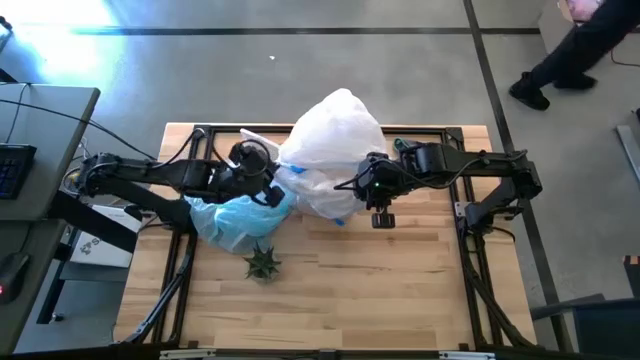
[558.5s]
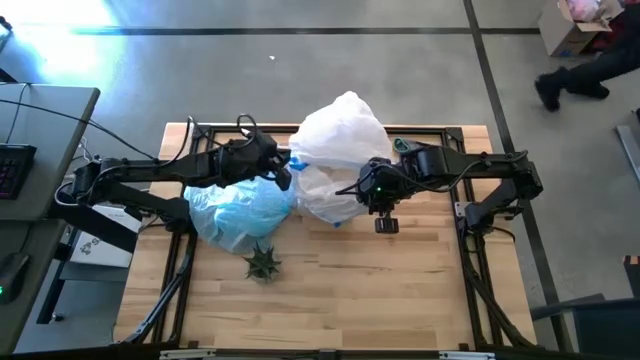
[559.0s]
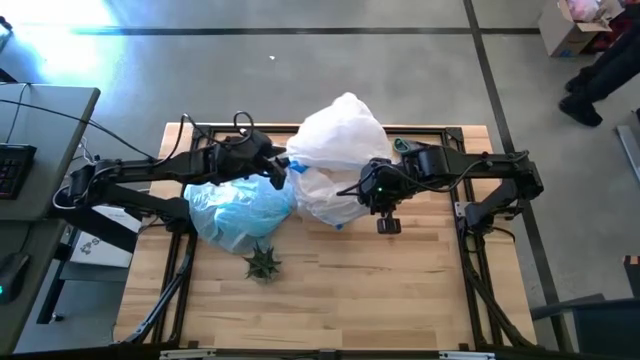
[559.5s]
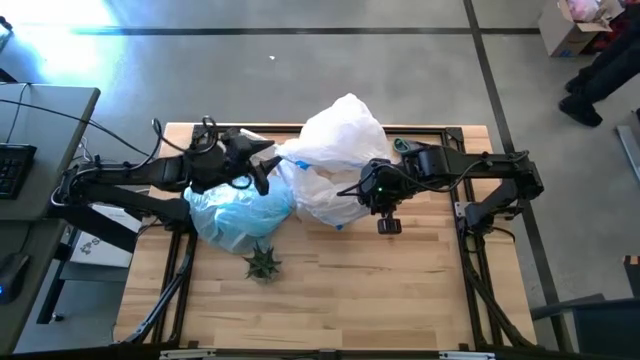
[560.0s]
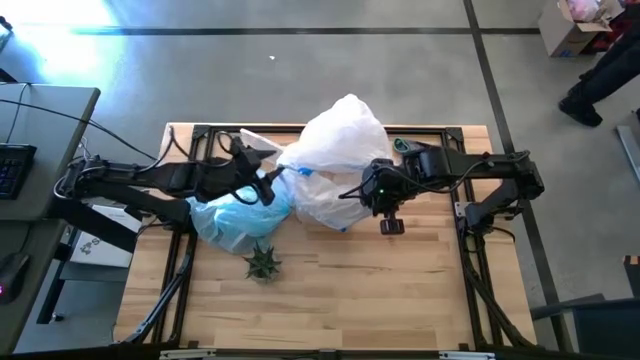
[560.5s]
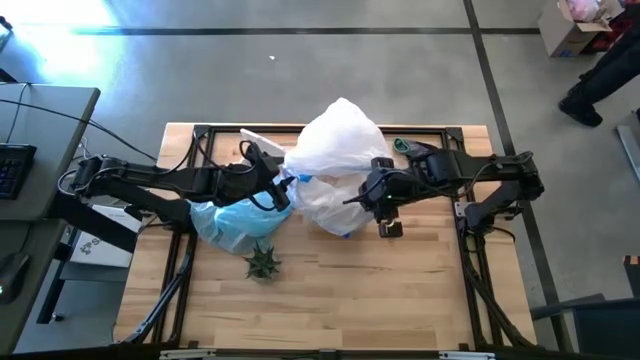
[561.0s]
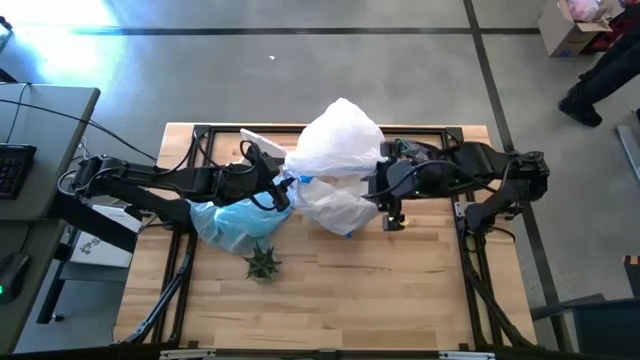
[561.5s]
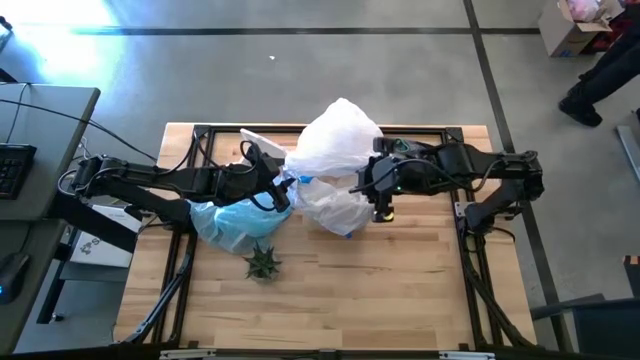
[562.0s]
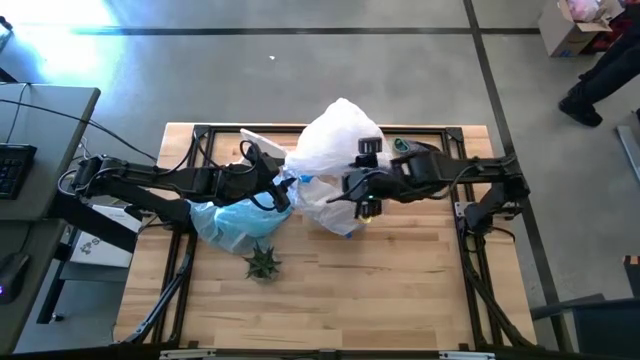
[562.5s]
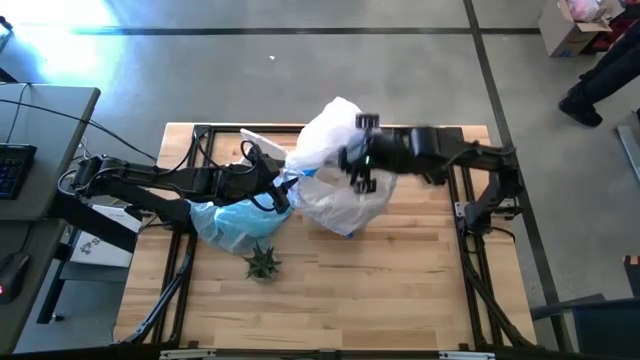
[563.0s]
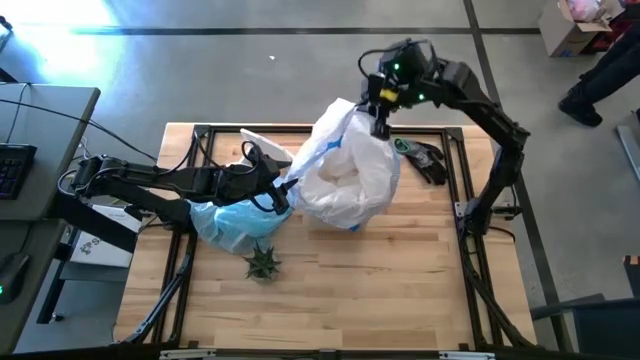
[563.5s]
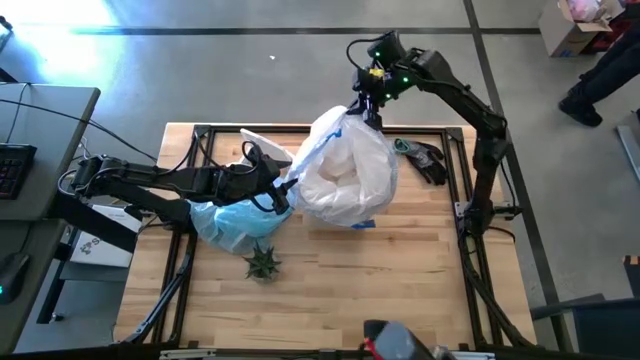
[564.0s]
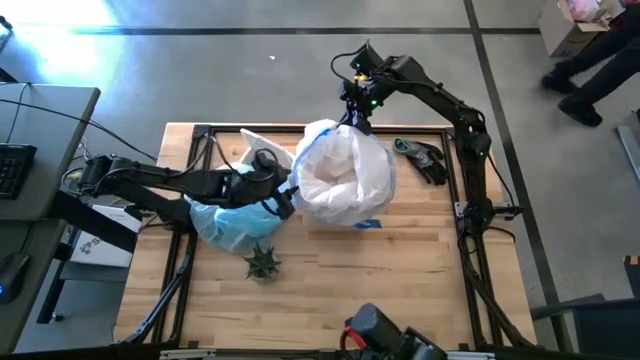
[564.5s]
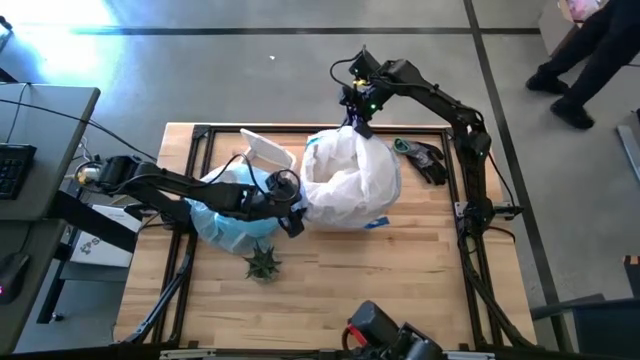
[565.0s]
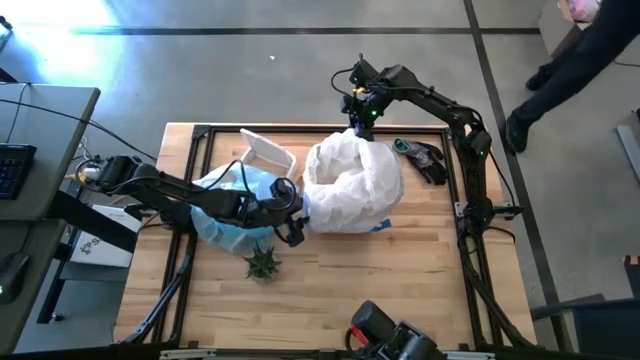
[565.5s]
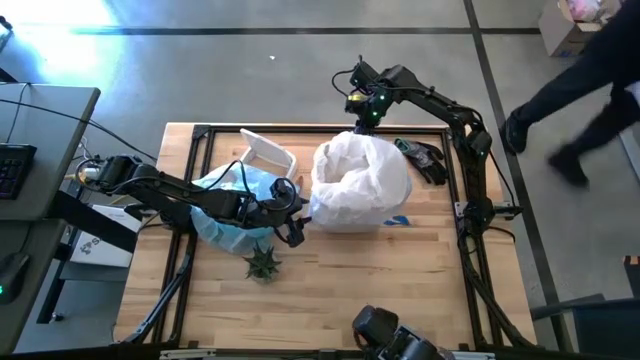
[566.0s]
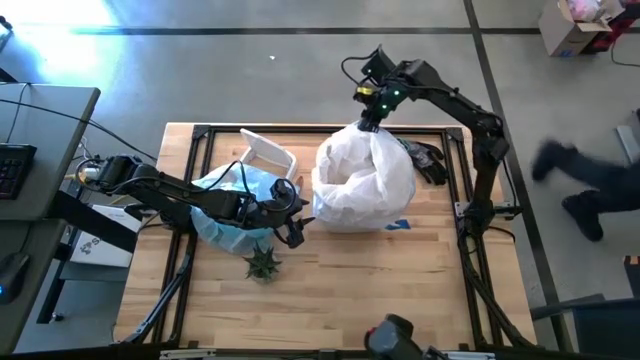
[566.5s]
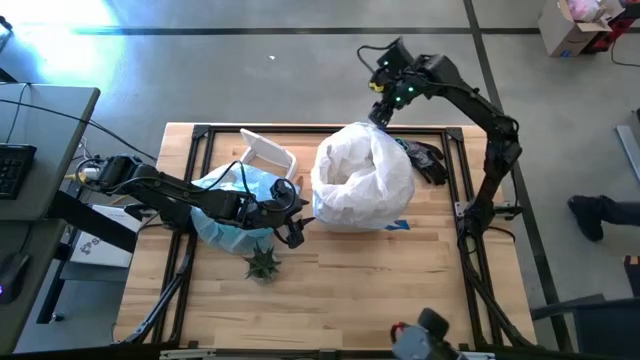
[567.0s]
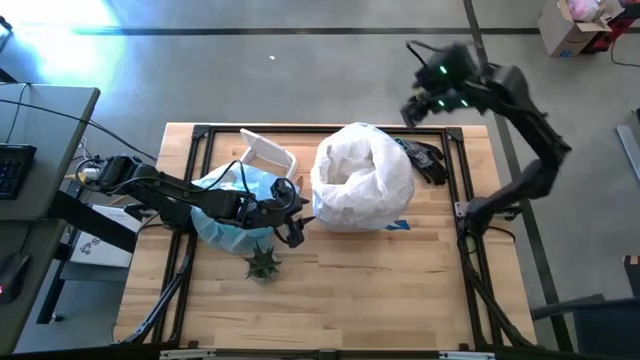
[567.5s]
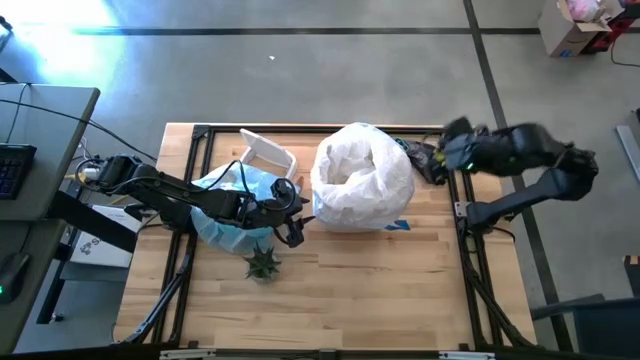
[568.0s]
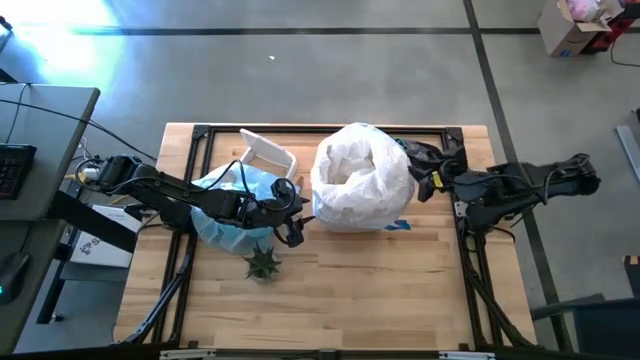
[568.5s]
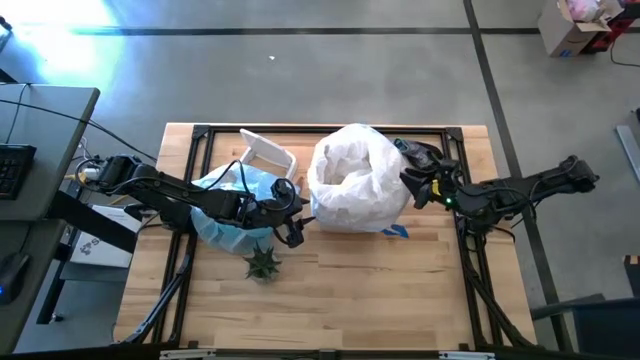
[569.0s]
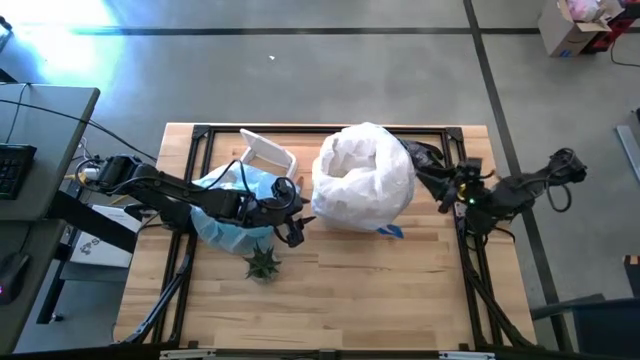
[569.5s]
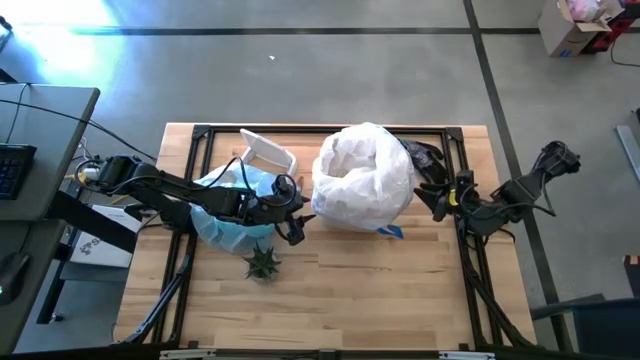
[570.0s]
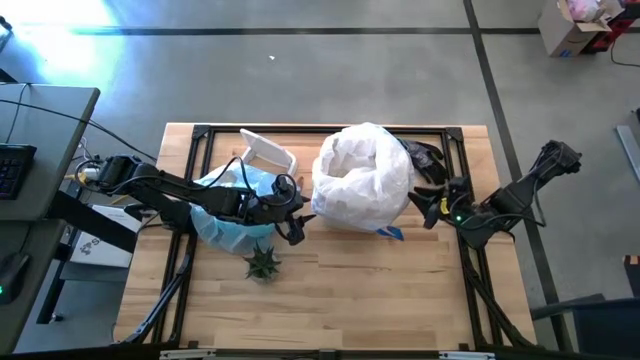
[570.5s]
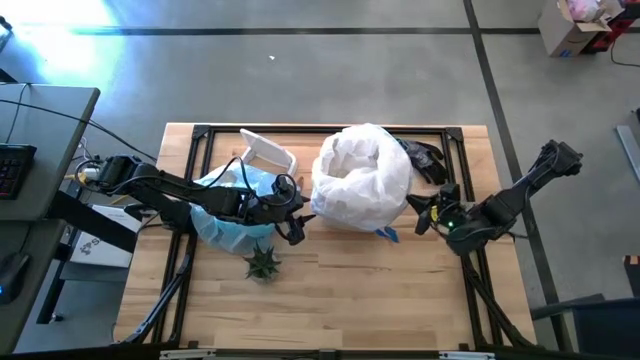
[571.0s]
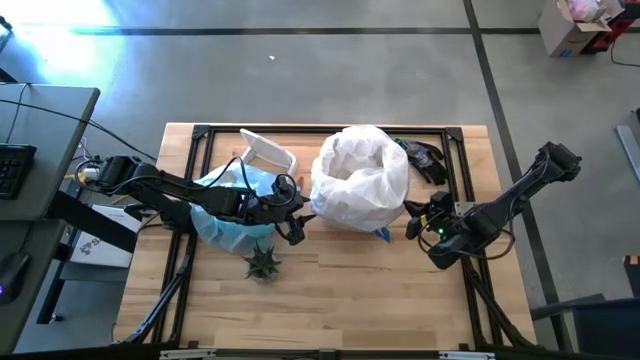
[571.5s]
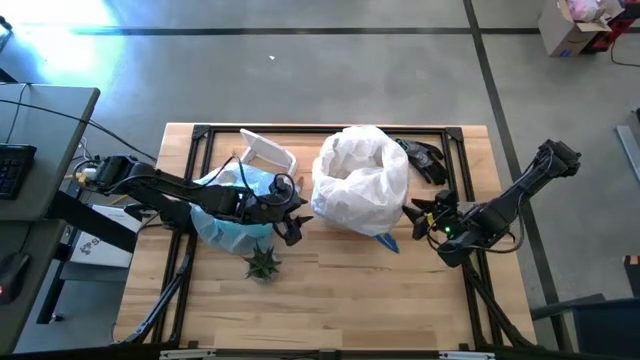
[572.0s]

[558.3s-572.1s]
Task: place trash/remove bag and relplace
Insert the new trash bag into the trash bin

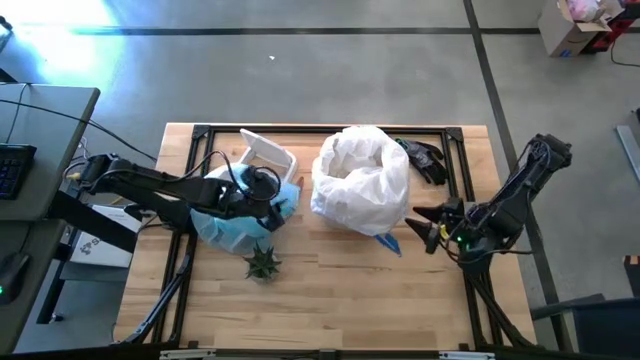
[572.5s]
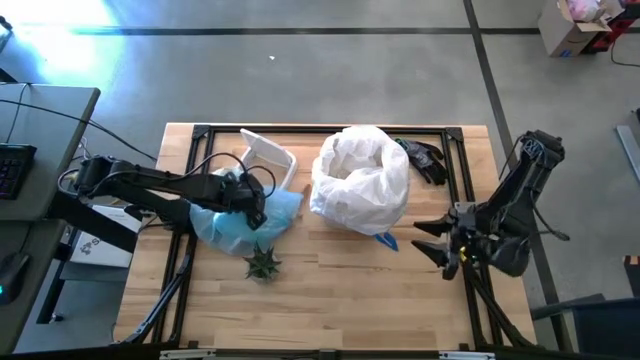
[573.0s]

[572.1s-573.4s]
Adjust the old trash bag

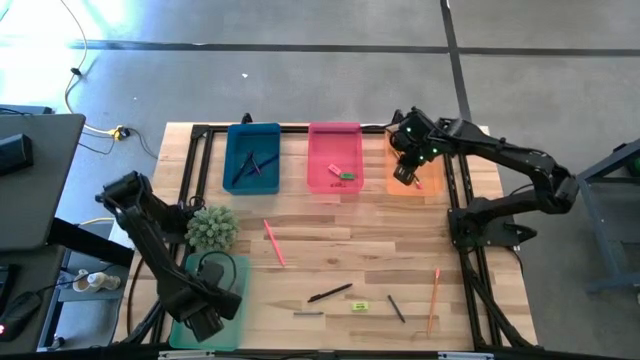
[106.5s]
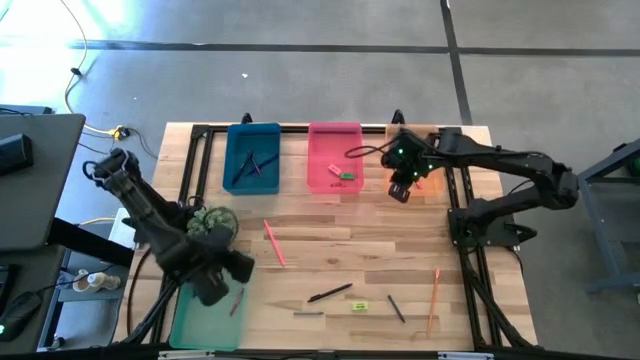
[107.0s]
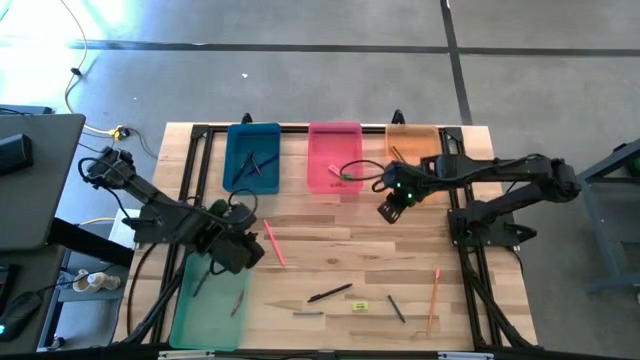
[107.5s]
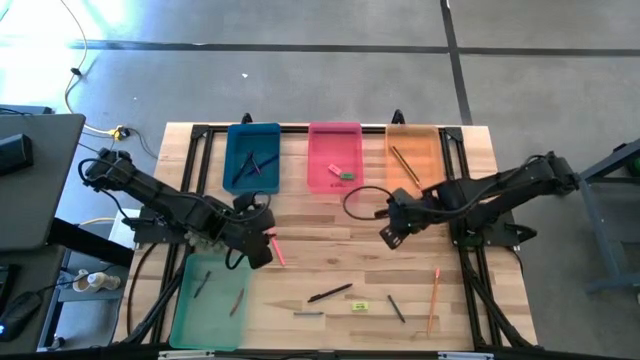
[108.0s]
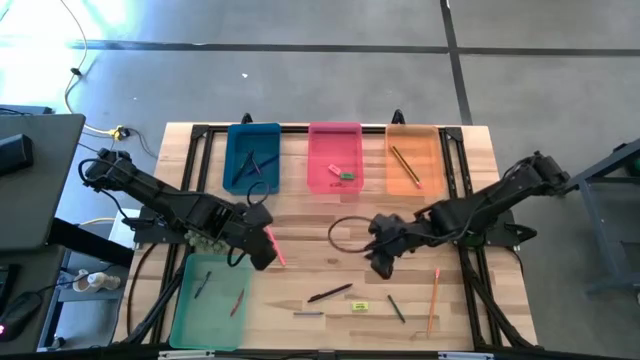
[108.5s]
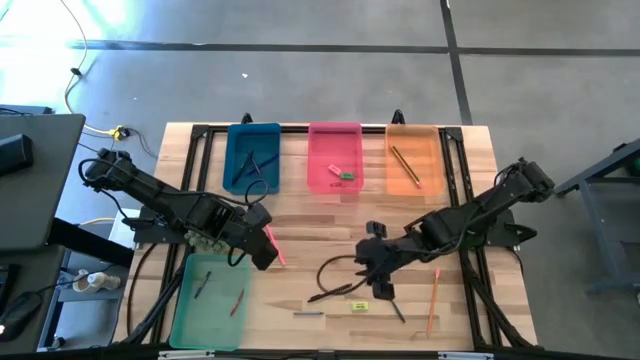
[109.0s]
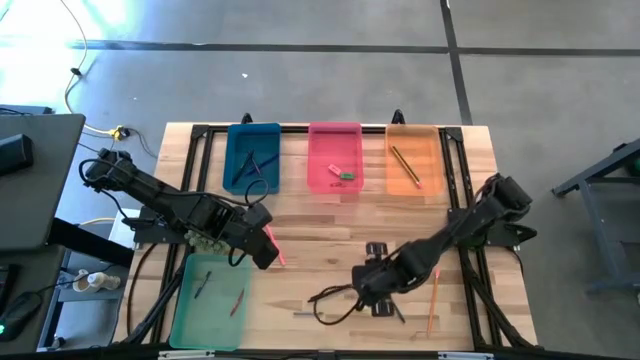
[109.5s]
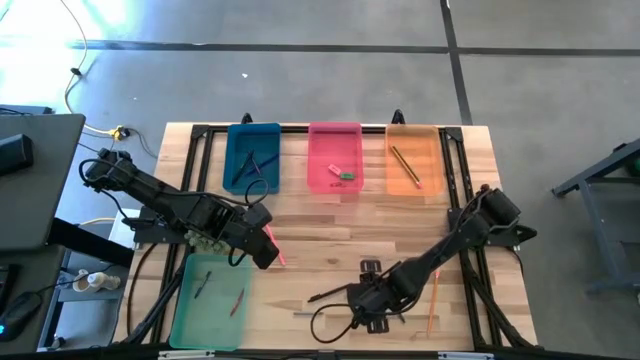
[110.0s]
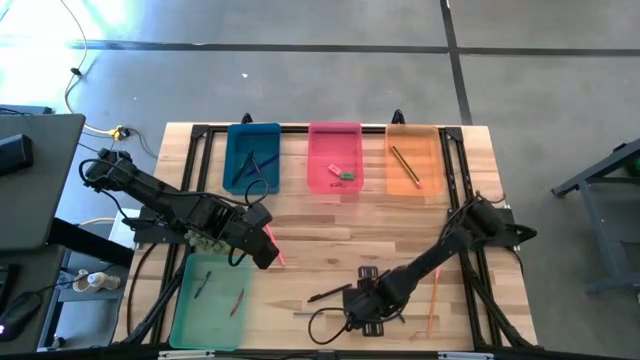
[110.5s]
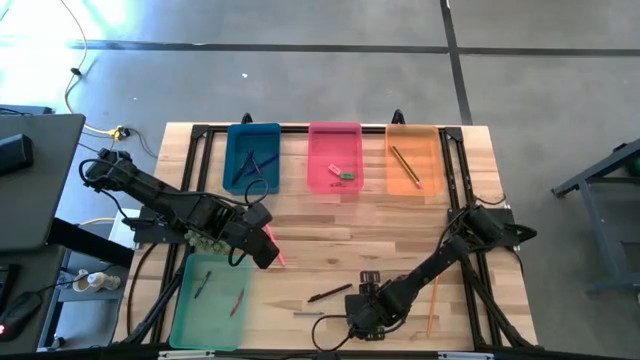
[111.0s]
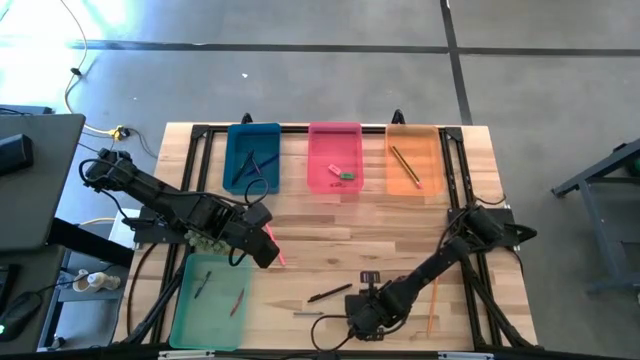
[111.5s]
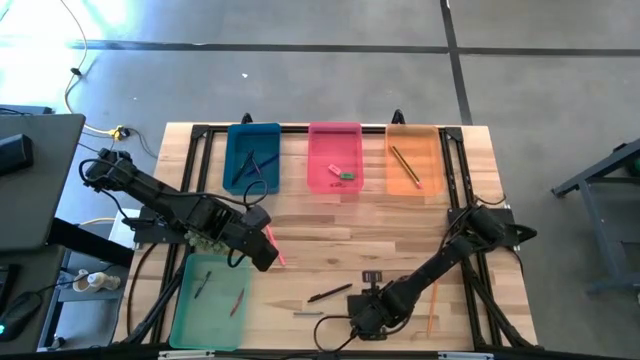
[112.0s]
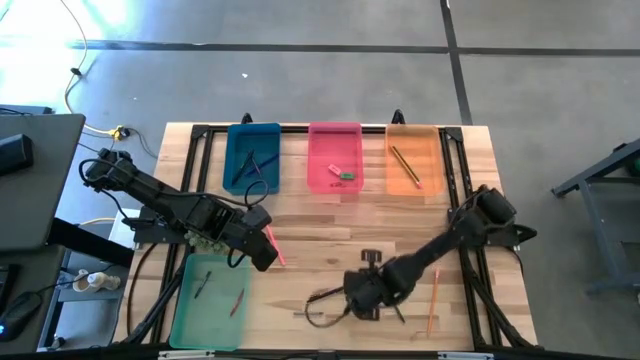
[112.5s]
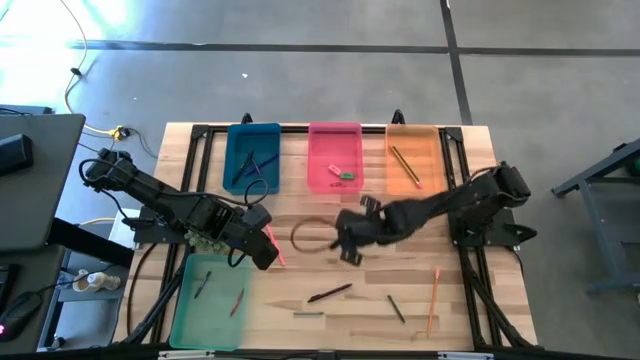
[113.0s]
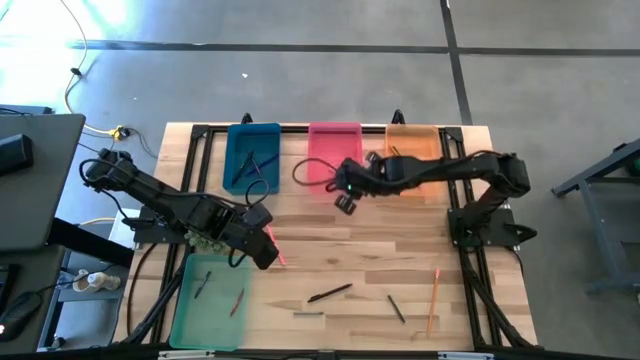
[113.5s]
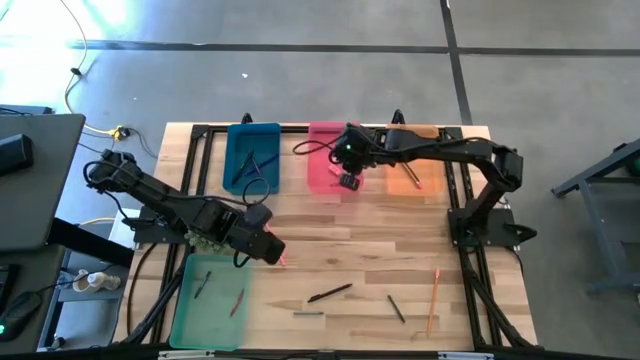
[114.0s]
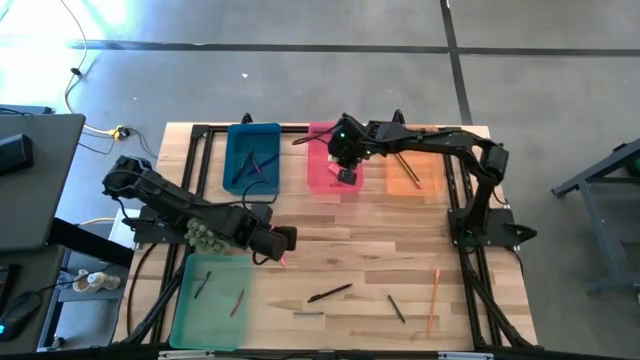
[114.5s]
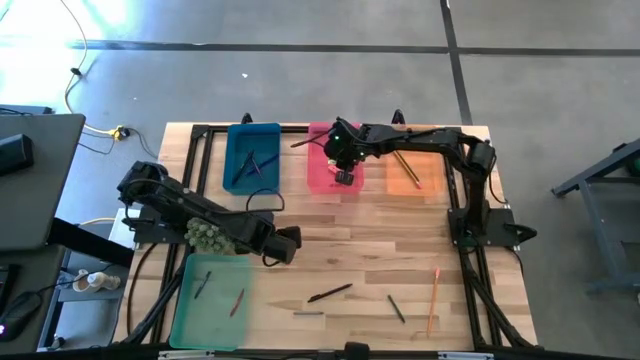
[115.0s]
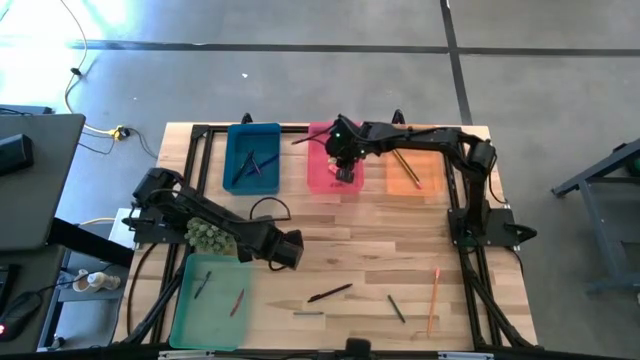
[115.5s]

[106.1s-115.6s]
Task: Sort crayons/erasers/pens/pencils in bins
Put the light green eraser into the pink bin
